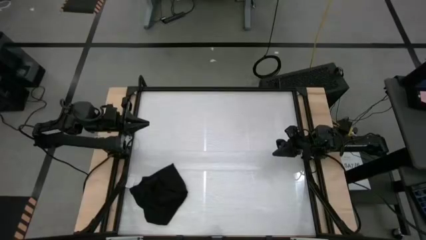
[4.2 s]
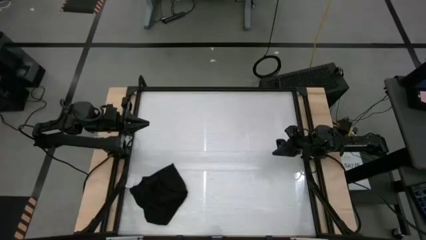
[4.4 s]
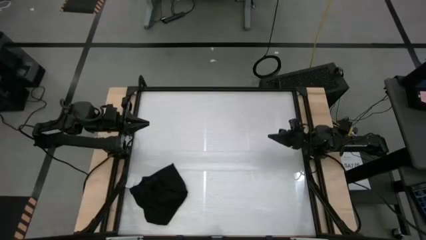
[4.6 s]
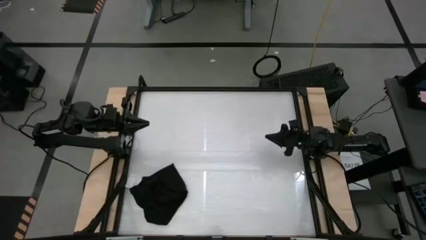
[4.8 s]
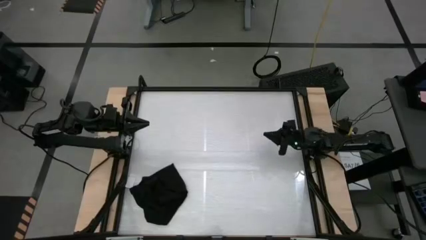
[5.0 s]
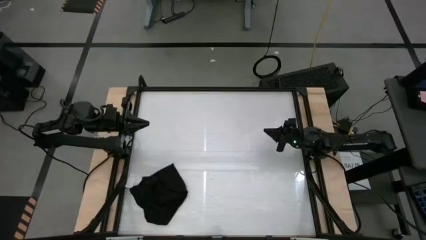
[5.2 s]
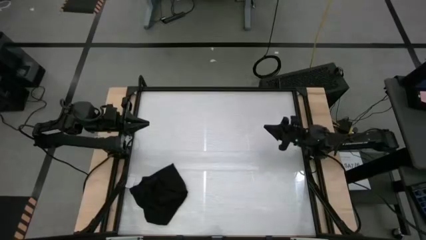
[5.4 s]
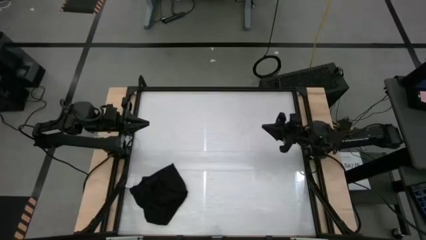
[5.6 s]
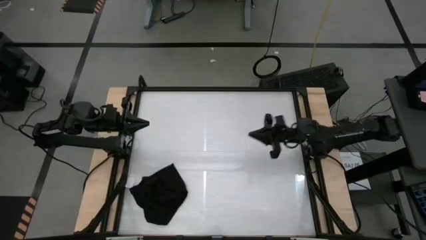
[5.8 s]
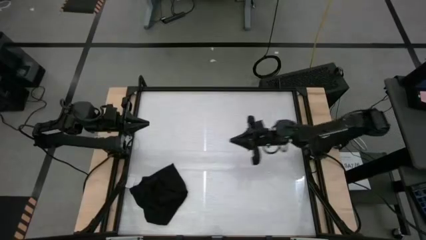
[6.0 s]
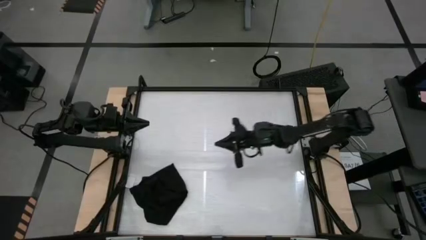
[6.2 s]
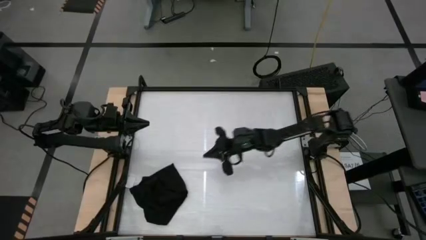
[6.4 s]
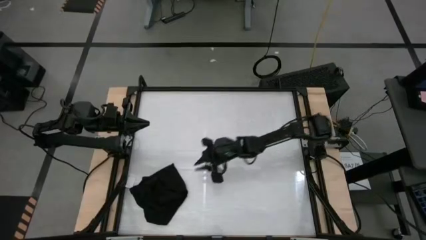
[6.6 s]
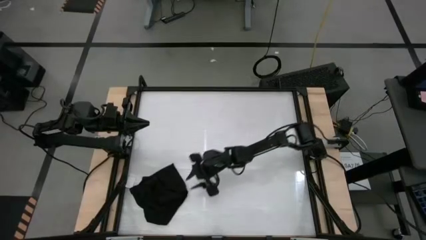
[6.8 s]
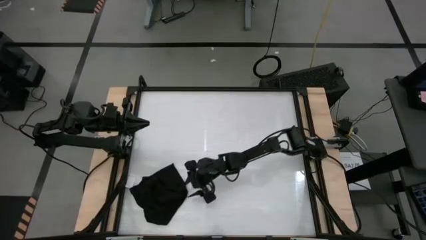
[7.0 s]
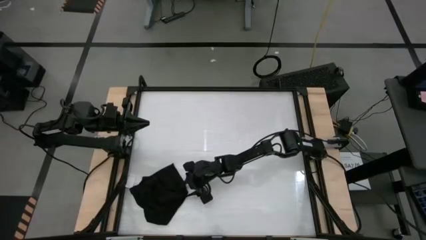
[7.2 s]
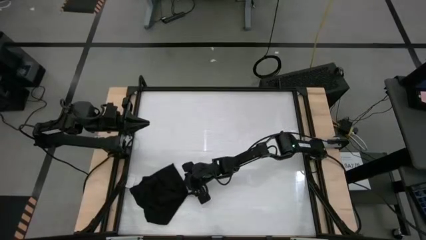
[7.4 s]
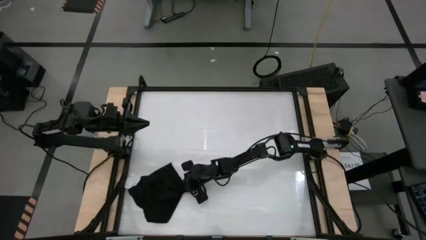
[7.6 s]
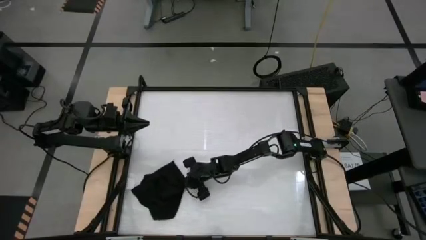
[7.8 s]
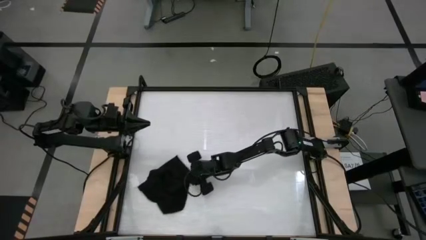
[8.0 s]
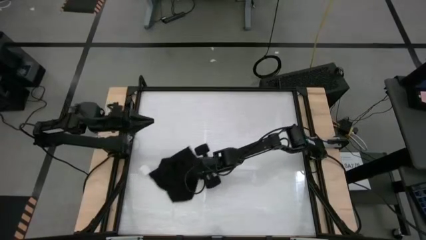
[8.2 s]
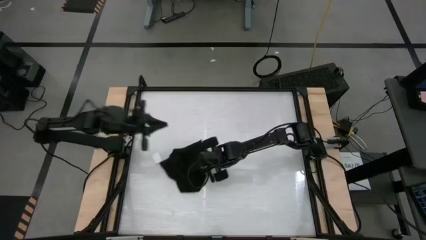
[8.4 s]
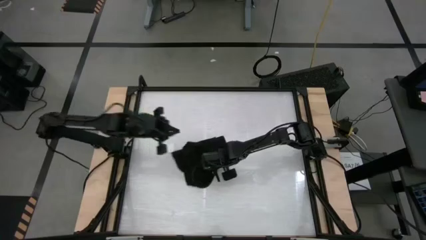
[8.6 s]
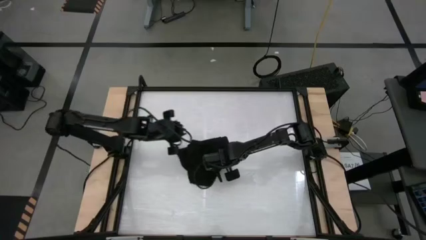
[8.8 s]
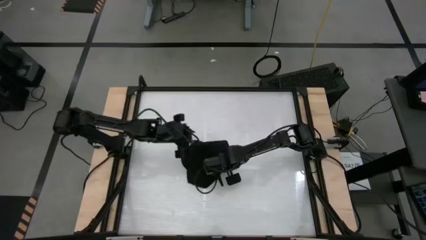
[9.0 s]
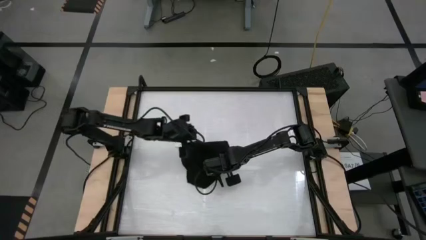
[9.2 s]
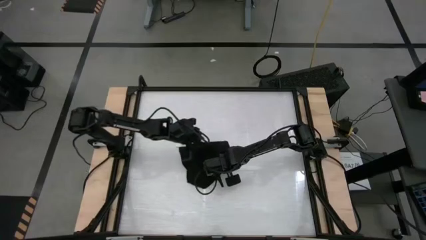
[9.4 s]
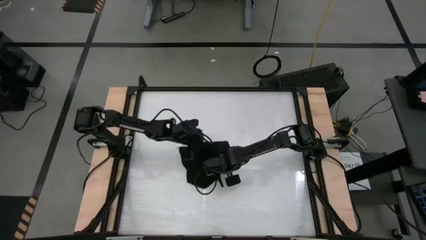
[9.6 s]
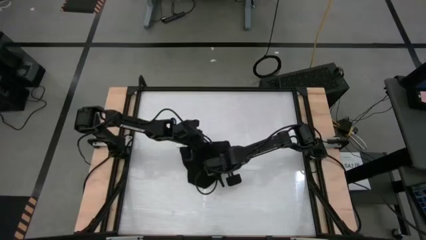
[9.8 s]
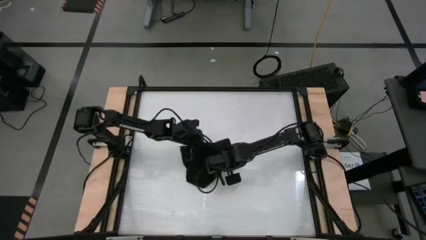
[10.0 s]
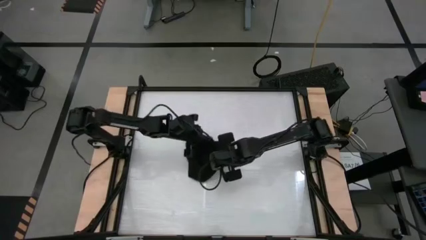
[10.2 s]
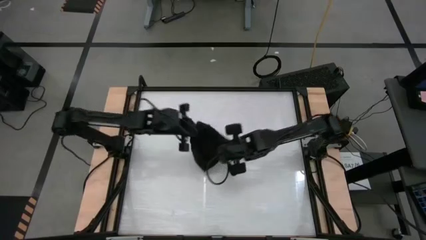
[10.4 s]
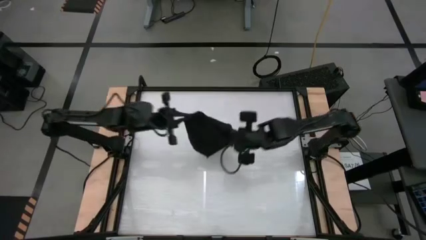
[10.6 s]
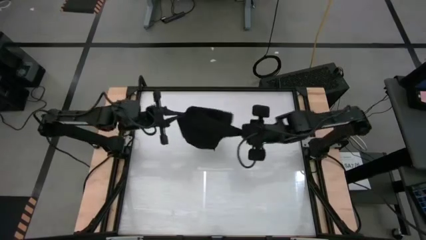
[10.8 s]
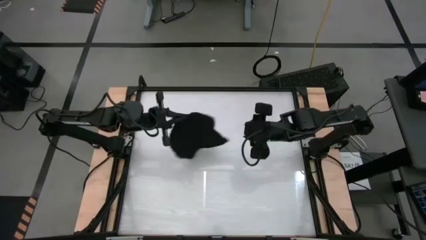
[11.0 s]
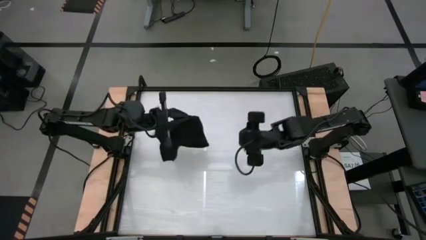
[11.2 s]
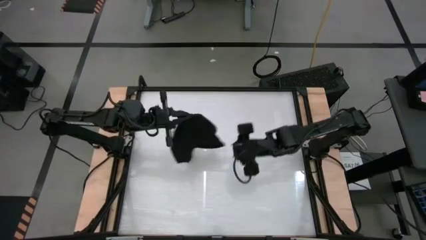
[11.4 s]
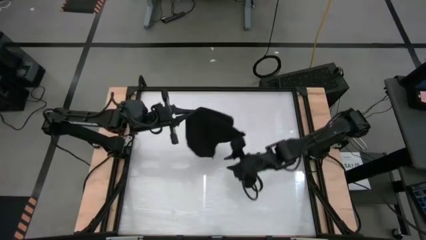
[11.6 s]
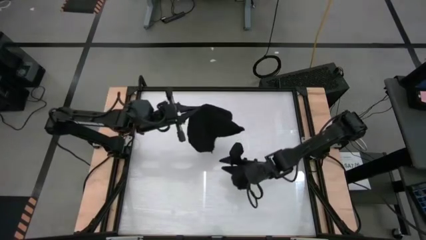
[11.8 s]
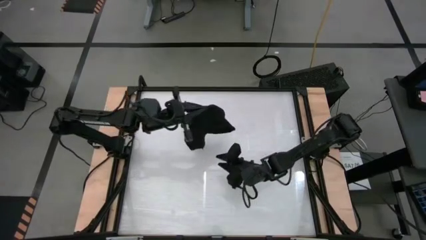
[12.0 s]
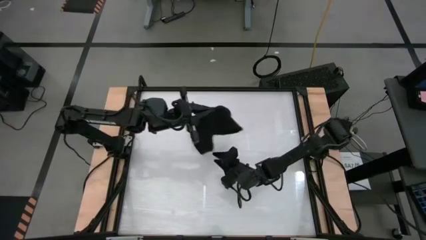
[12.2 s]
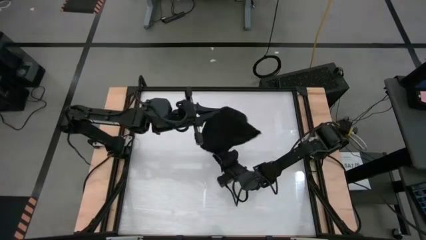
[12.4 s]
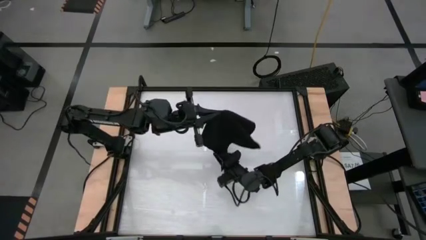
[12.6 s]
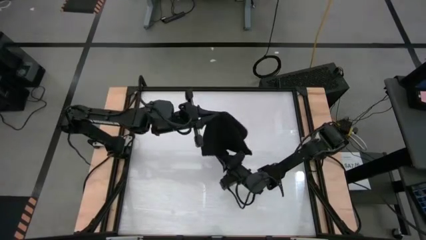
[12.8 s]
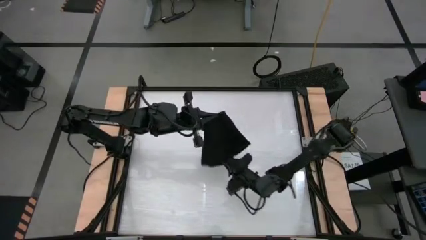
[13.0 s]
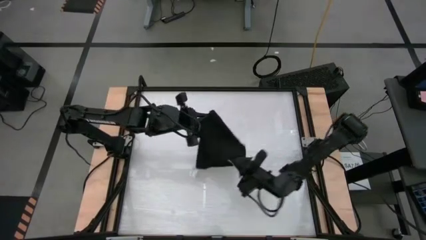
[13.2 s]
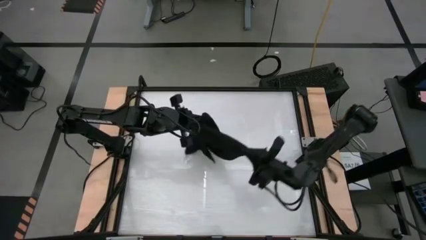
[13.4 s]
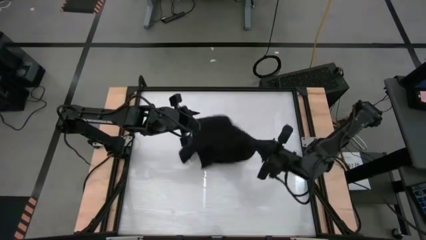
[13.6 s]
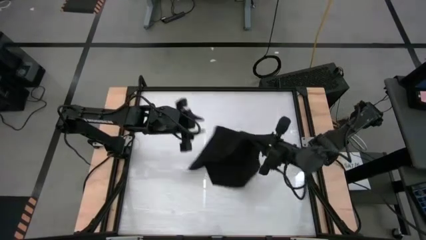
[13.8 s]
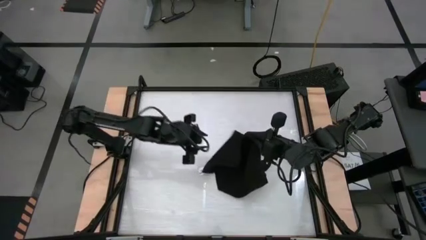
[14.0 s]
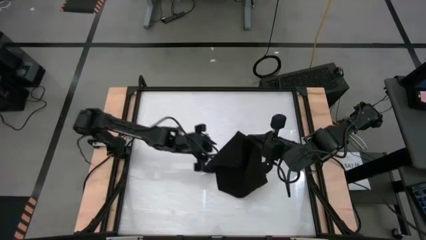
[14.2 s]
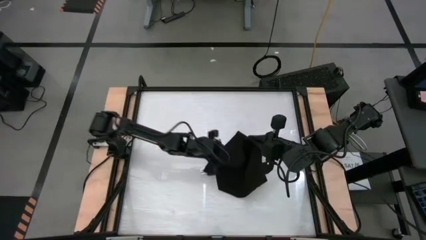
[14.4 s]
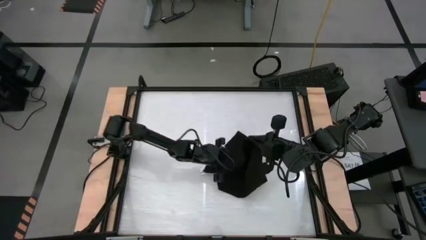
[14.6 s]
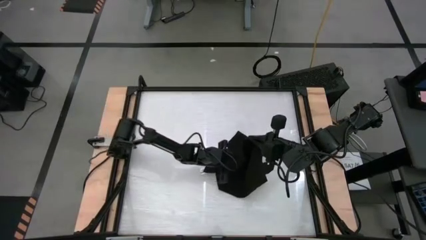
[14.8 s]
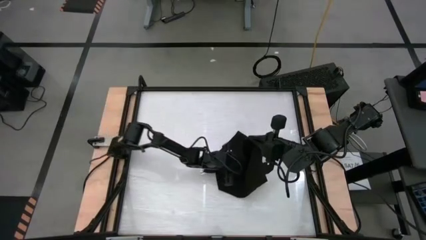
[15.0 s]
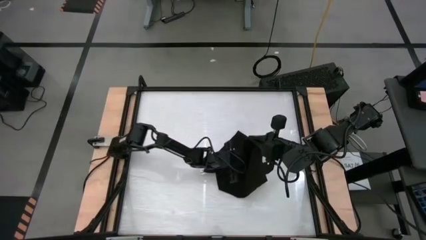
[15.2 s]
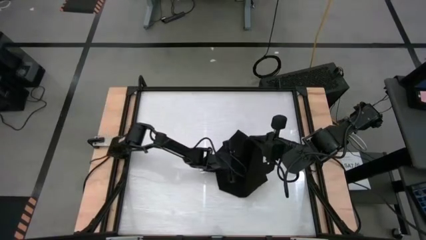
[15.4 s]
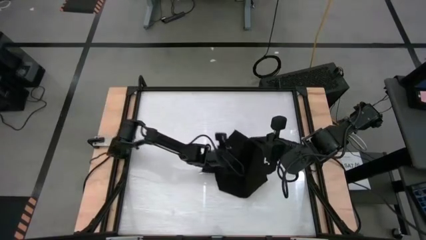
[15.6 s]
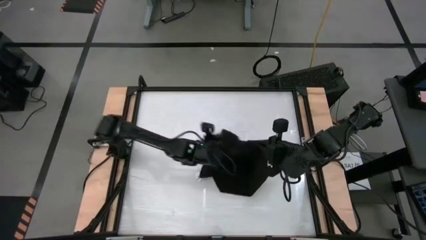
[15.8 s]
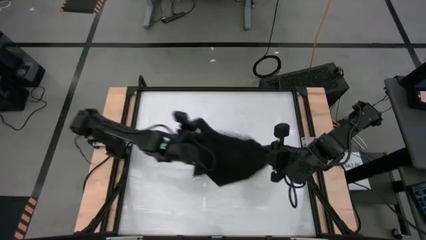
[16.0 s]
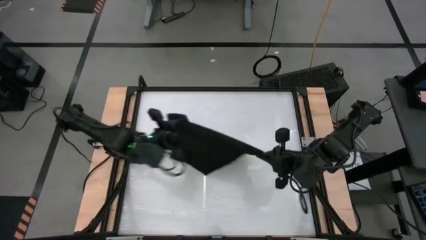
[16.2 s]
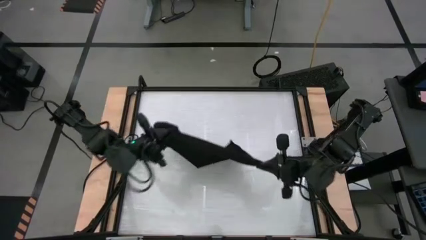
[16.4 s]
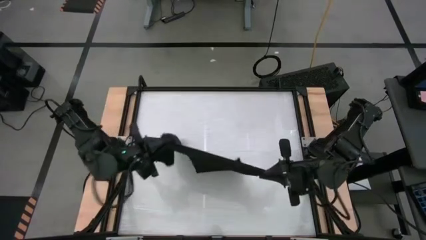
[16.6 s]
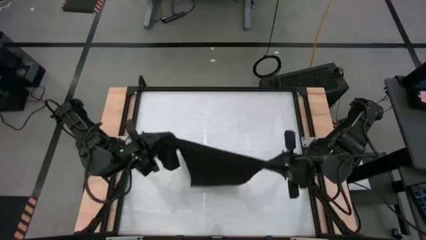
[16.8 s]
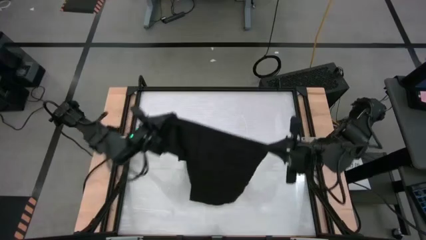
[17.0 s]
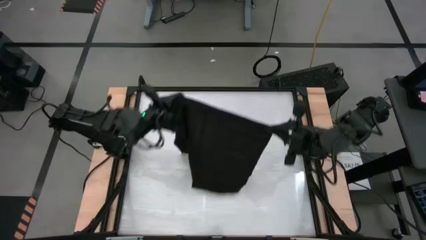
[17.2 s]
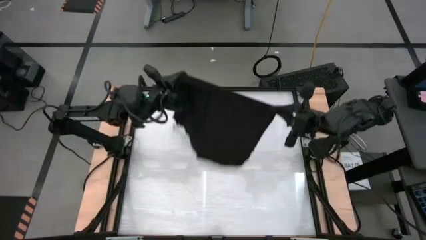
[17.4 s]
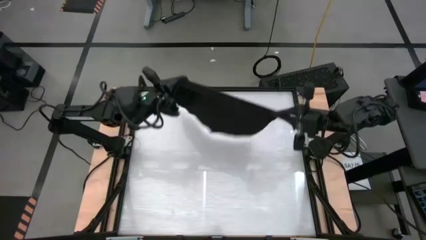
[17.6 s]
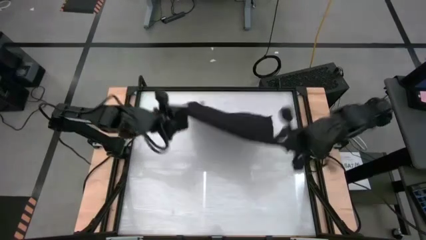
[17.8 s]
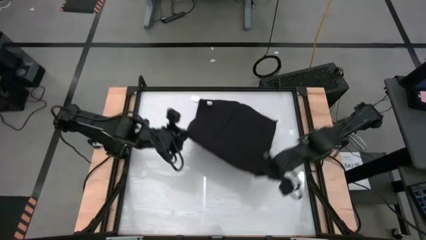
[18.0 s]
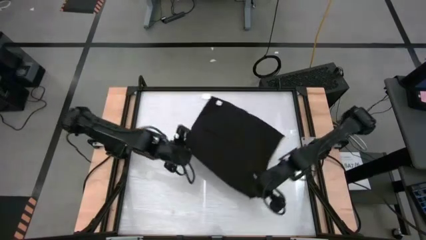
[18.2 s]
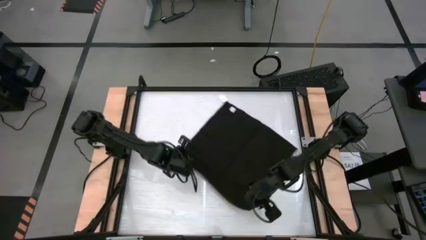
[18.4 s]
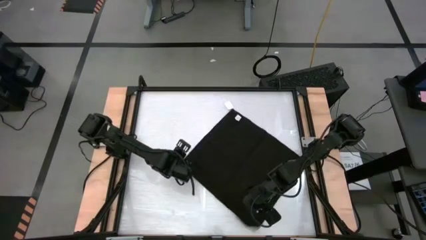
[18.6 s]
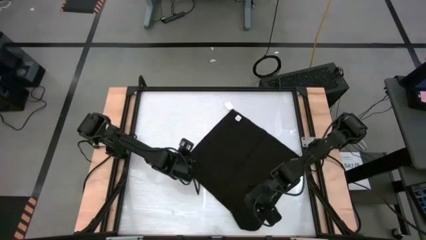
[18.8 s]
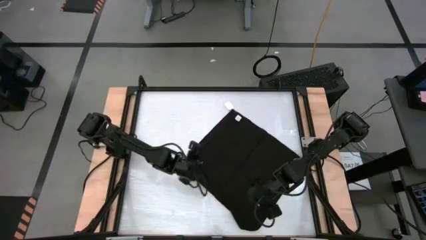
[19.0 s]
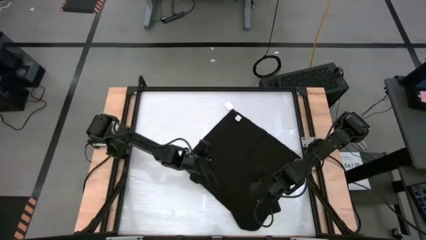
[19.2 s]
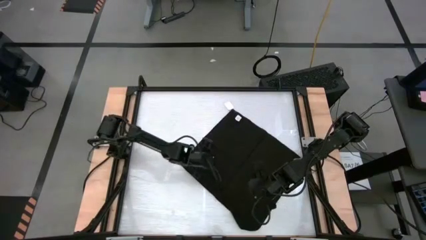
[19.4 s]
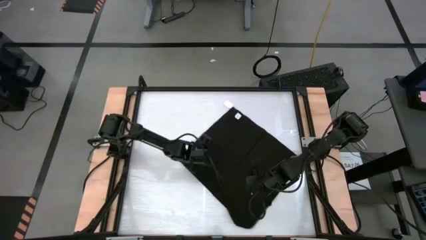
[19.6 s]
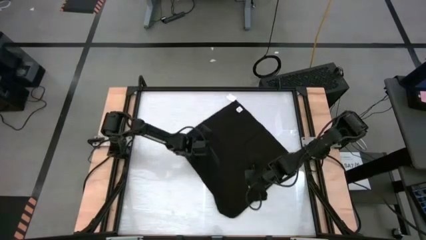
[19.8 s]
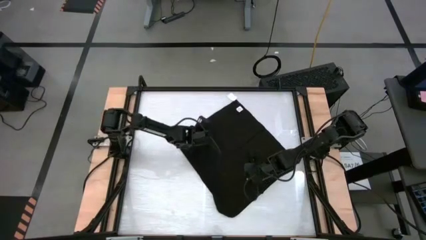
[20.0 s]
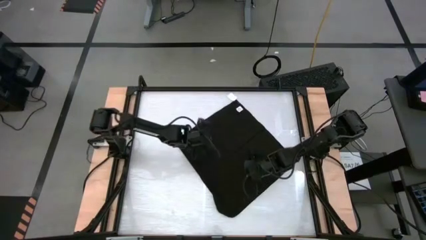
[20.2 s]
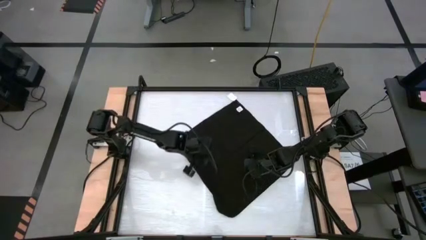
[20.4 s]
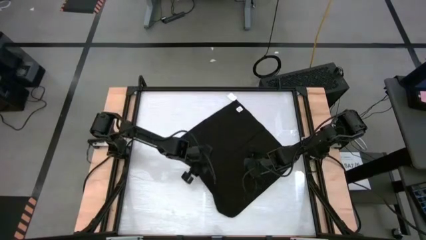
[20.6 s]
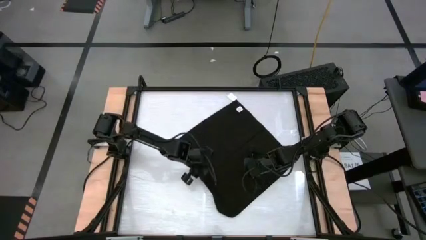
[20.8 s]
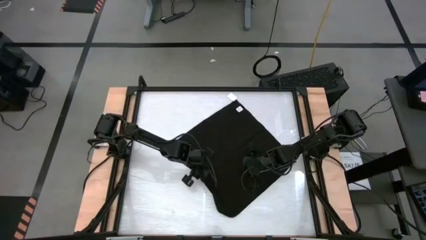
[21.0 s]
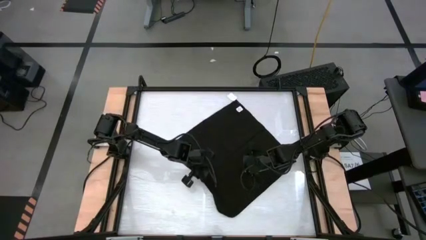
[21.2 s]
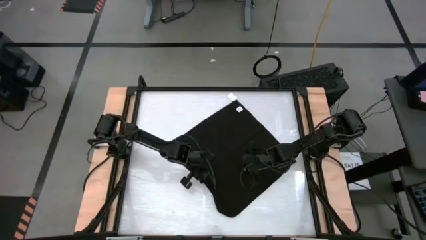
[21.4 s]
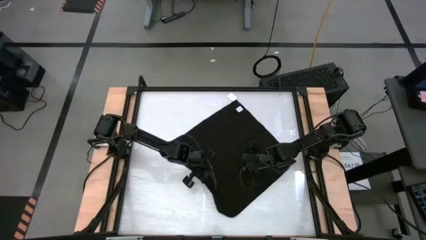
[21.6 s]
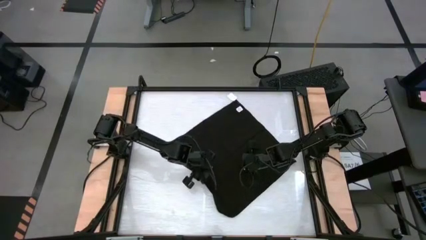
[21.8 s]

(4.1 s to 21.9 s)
Task: Roll towel
Roll the black towel
